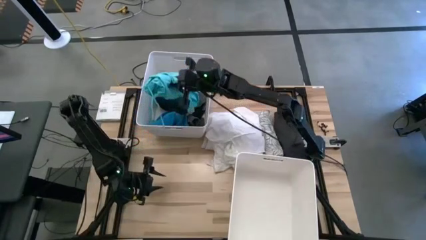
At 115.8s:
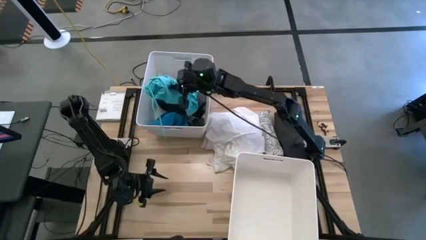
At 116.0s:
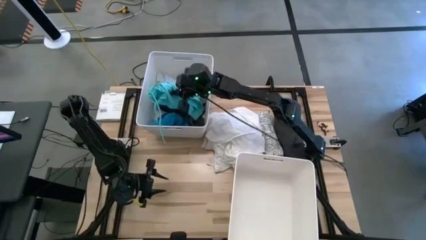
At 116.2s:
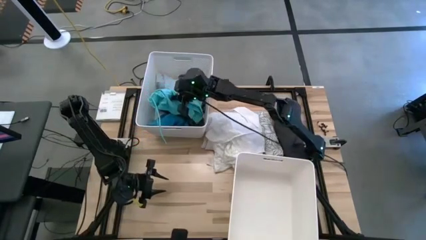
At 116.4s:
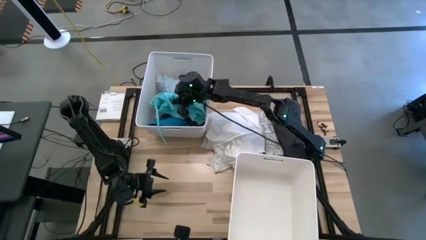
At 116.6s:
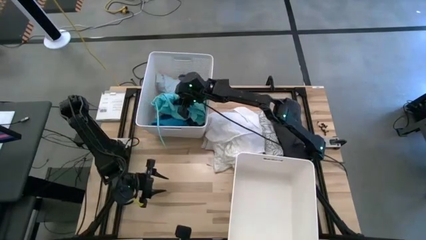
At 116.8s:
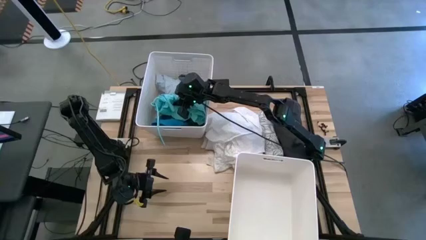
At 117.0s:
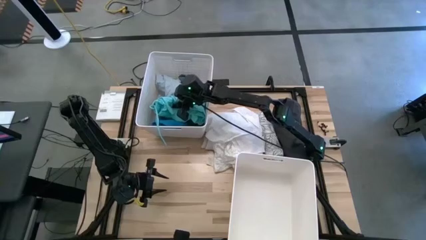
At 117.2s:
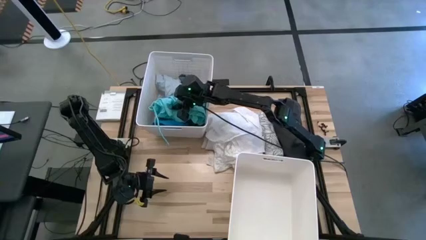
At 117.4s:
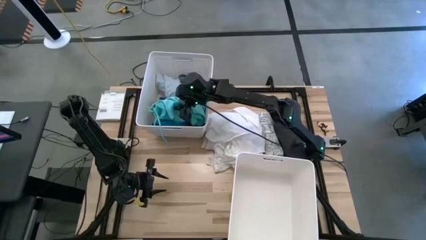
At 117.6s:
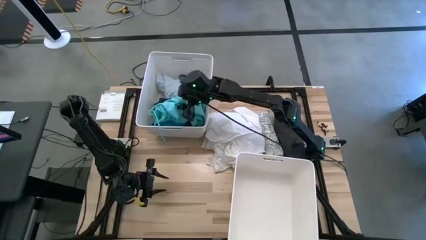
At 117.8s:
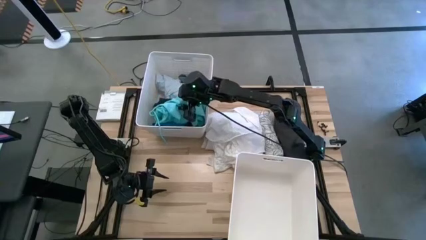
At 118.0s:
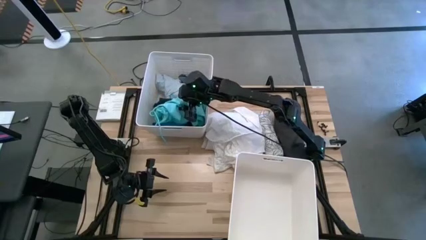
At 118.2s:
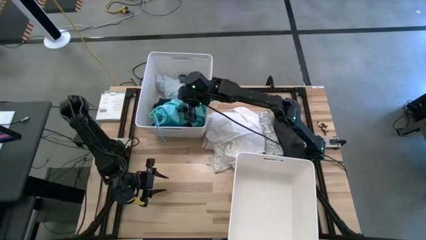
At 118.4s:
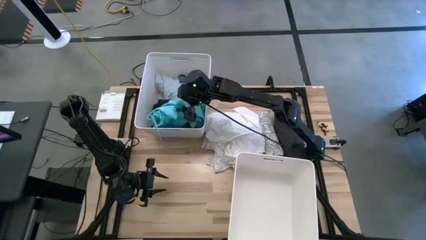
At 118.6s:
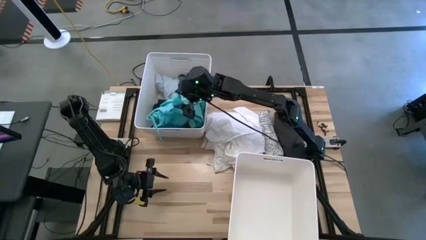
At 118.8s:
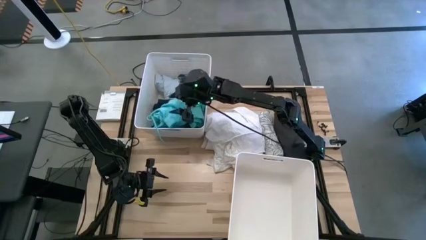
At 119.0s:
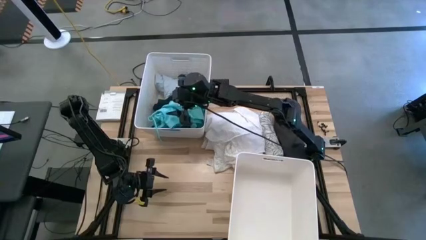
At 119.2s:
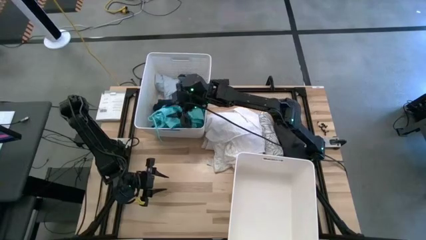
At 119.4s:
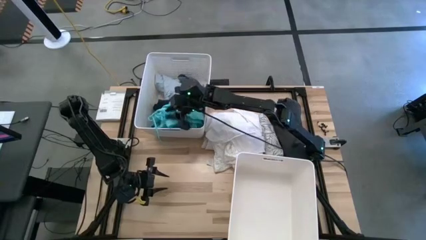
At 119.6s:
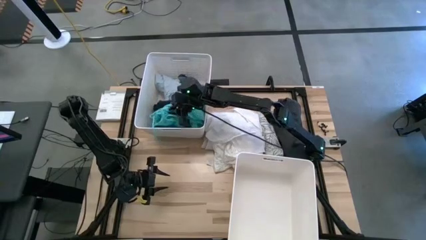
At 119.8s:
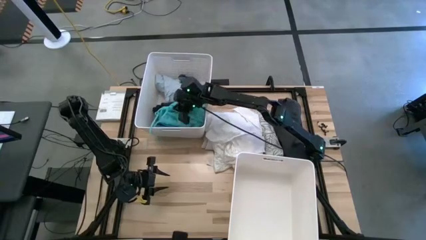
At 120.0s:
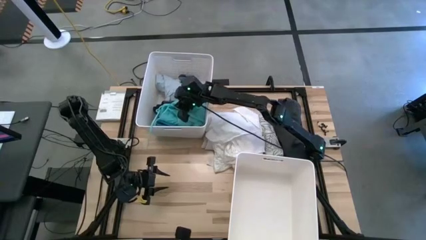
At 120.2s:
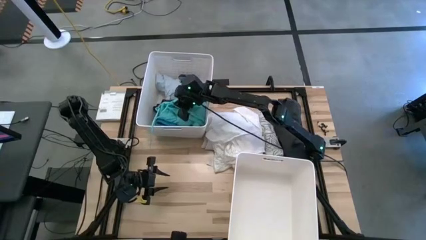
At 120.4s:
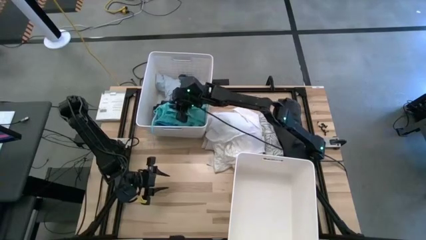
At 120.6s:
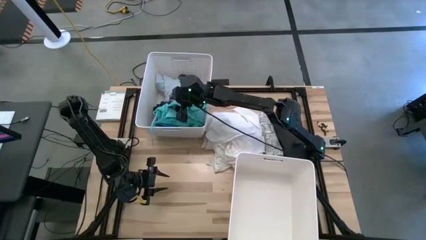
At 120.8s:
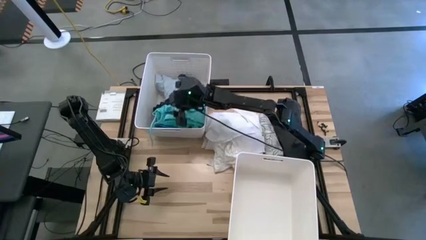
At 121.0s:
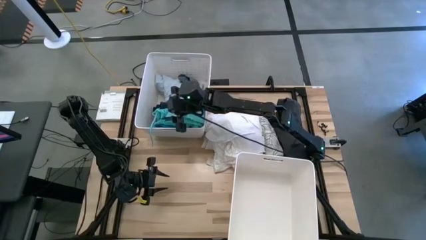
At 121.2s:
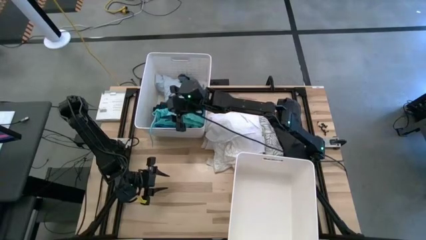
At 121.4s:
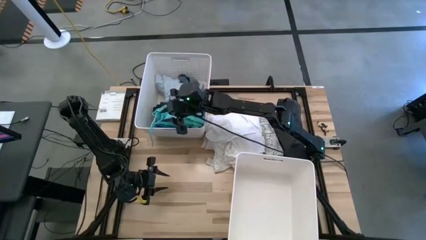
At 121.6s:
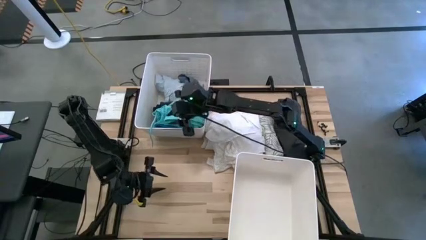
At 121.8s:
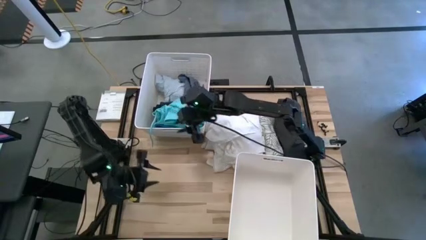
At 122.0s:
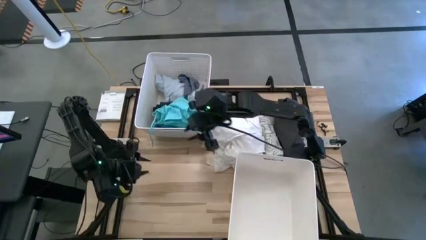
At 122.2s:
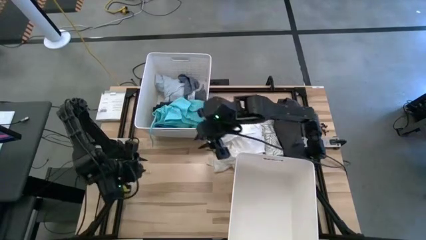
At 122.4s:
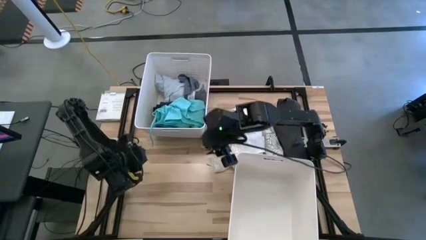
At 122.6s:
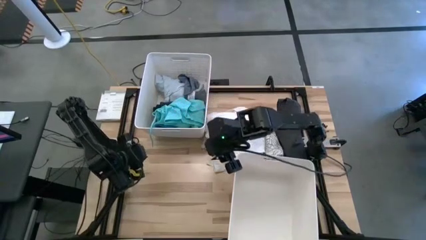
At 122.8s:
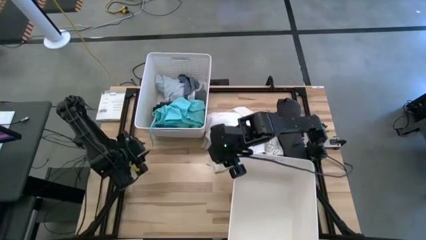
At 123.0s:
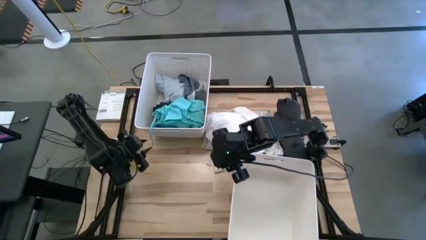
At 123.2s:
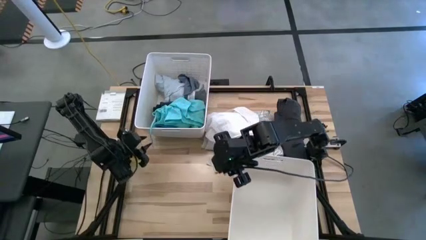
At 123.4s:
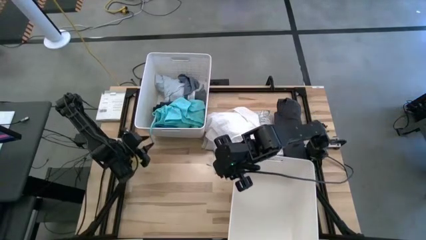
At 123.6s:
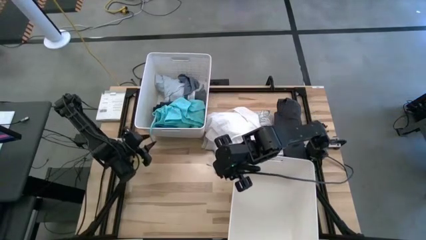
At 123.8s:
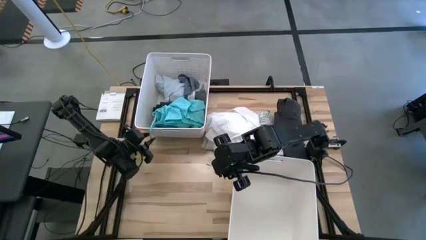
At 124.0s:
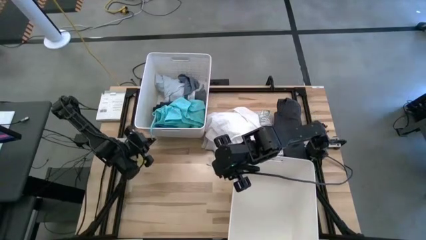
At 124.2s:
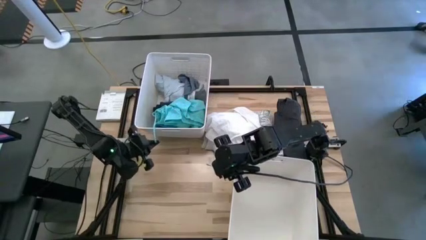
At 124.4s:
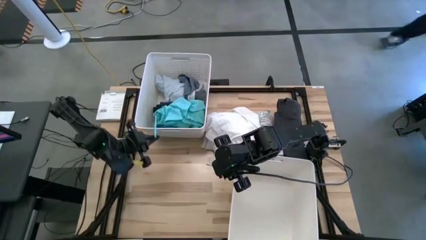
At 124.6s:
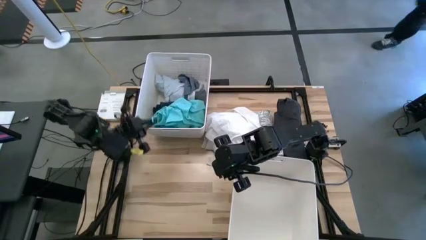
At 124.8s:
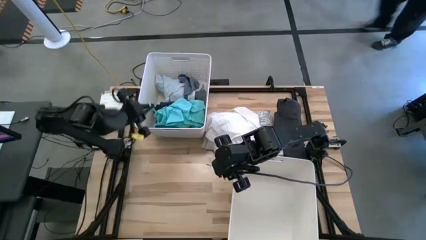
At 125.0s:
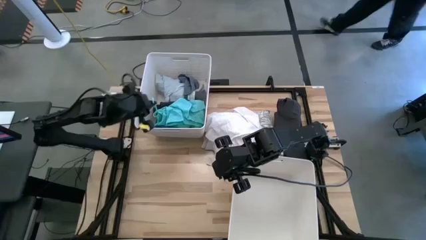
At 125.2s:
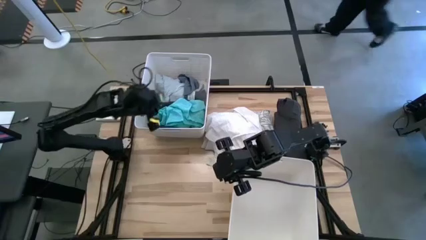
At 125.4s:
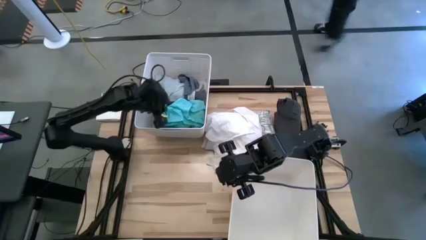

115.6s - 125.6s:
Task: Sort clothes
Put the light blue shorts into the top white laundry bin

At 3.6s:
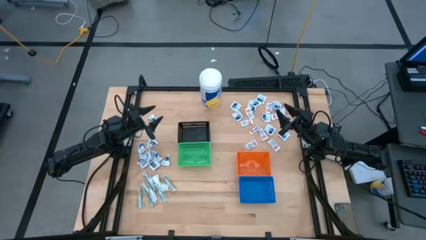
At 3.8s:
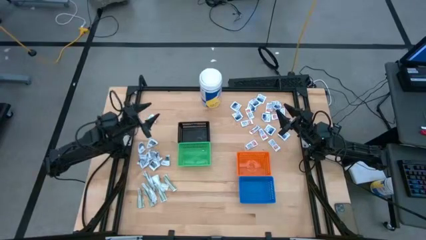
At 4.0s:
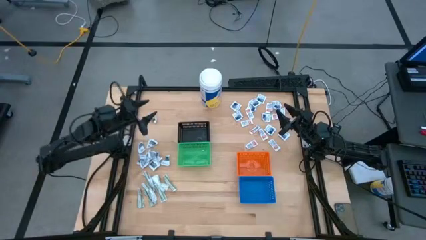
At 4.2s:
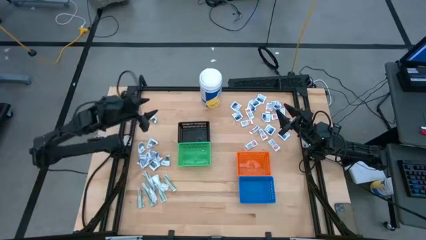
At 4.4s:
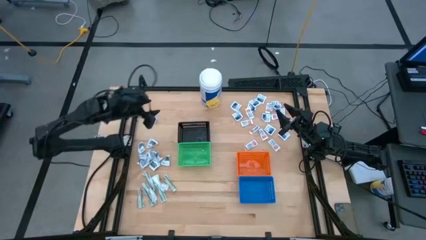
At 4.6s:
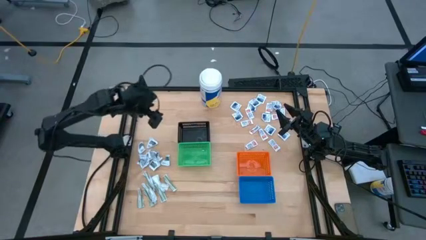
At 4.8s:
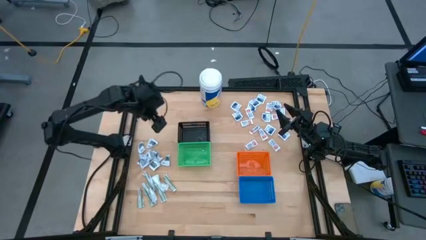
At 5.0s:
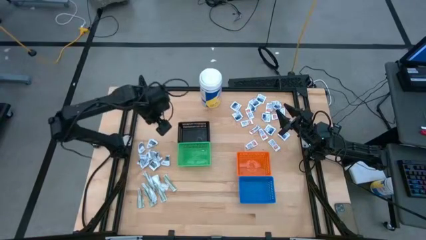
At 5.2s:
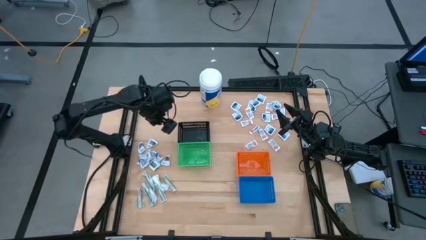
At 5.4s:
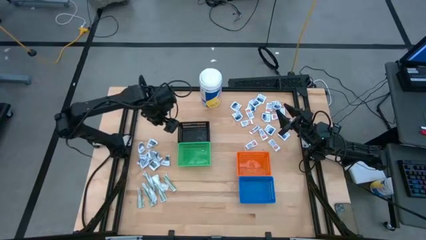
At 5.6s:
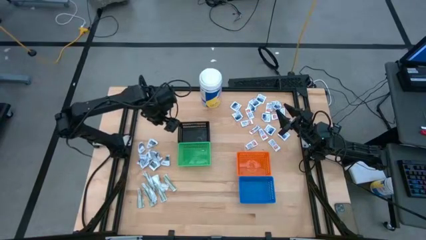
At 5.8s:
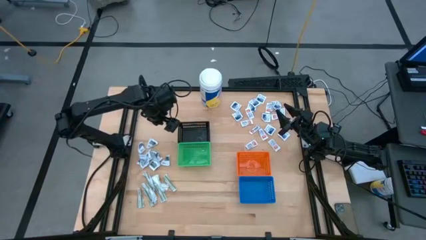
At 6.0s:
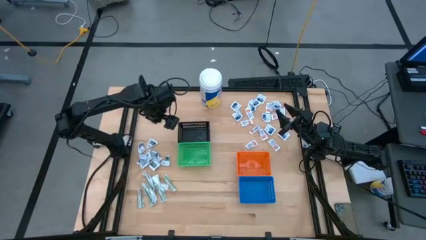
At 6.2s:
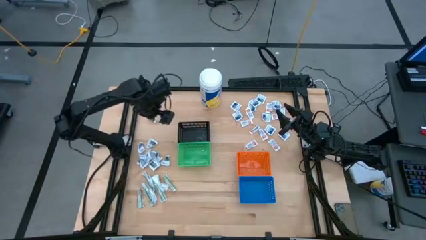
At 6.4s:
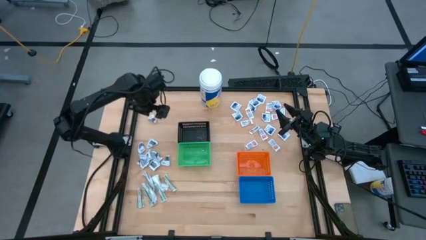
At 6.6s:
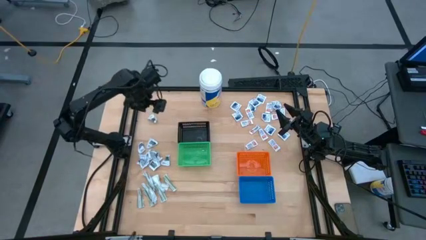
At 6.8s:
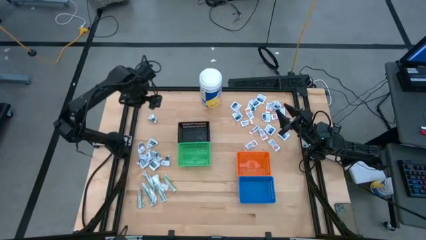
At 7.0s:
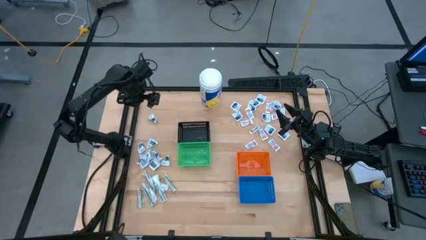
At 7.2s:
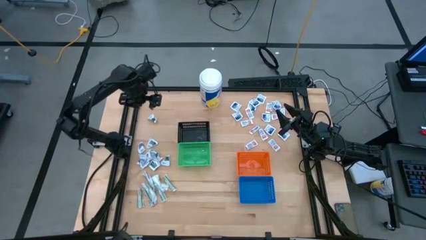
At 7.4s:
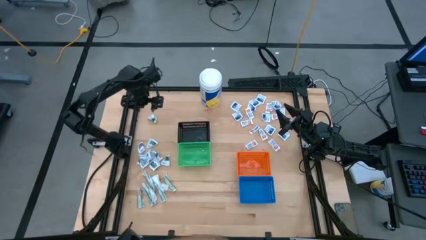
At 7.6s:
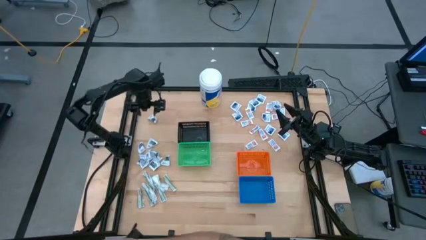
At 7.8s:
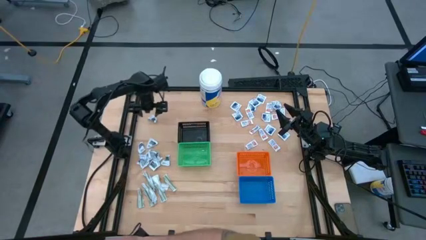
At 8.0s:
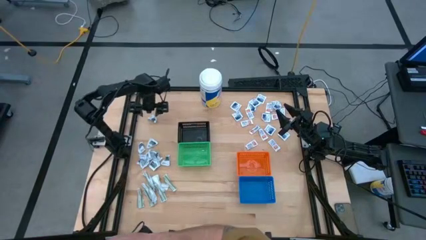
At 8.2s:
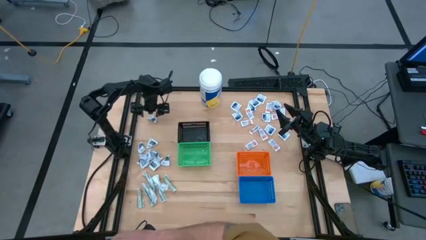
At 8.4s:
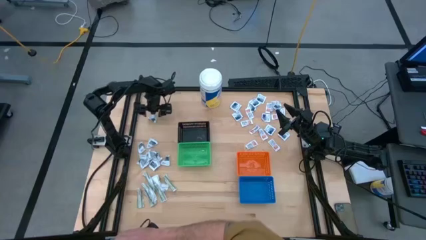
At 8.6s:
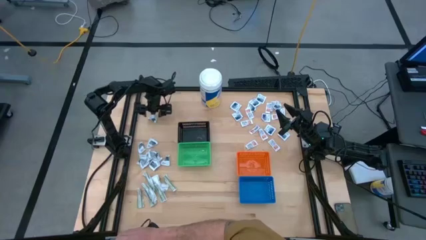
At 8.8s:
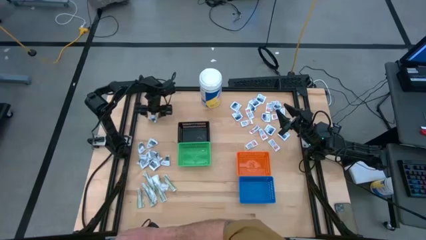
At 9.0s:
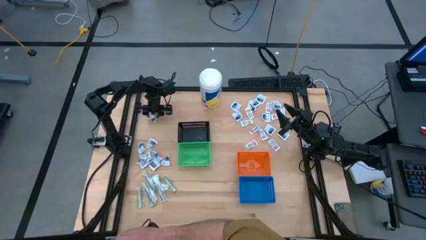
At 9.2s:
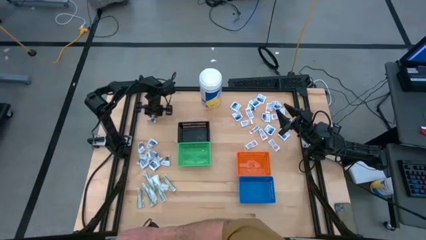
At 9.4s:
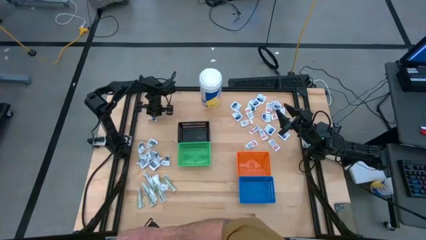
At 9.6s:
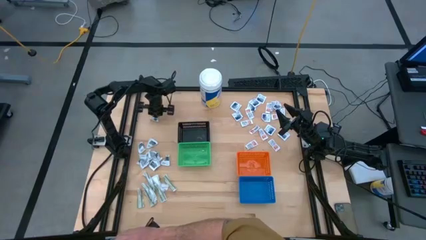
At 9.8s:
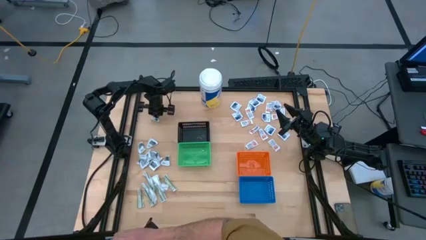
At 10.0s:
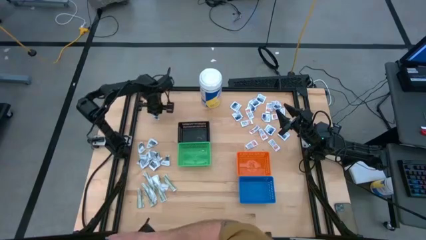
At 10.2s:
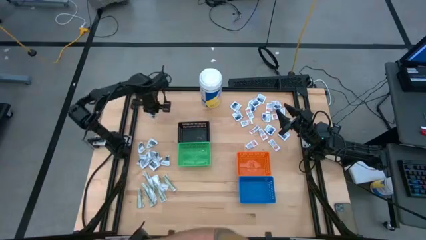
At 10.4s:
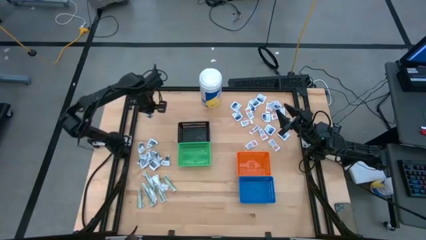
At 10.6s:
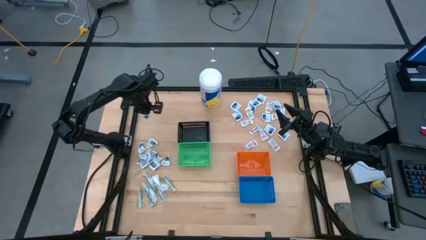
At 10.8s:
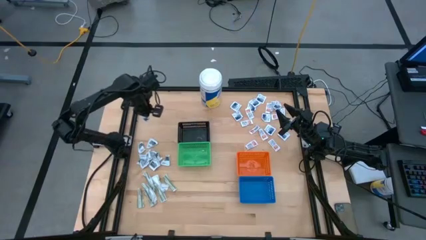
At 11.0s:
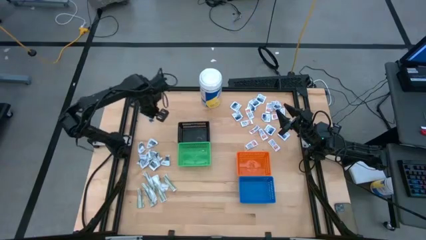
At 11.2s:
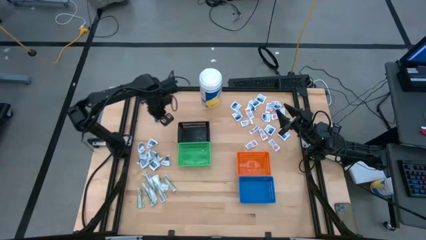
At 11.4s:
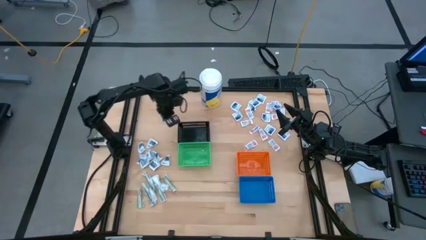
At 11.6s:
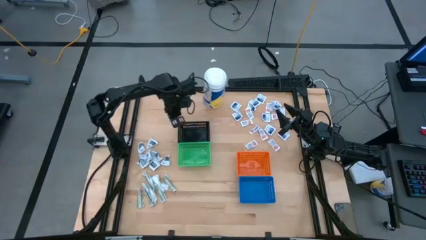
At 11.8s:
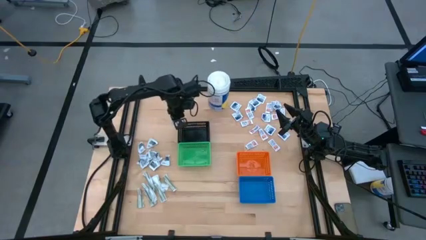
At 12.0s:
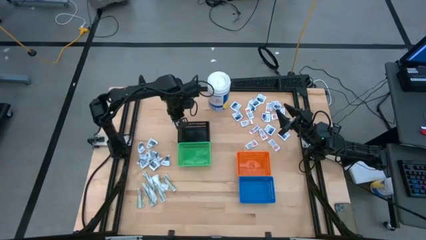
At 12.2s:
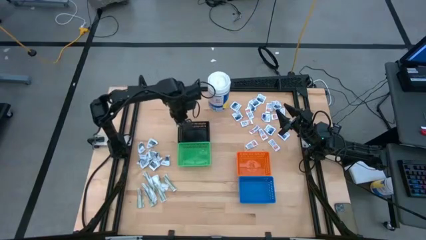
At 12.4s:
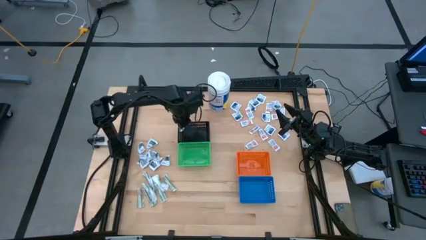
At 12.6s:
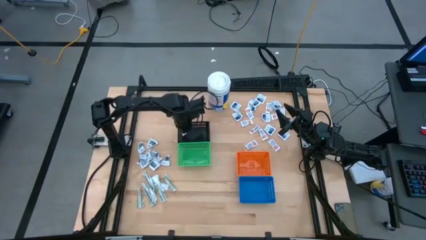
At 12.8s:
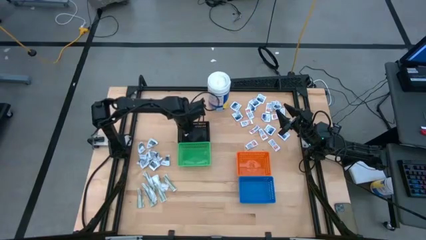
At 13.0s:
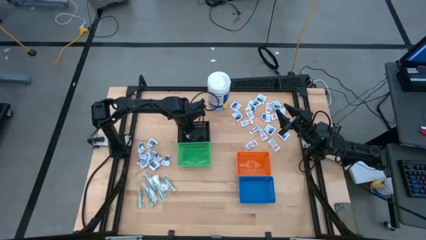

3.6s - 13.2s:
Task: Pick & Place First Aid Supplies
Put the black pad into the black bin
